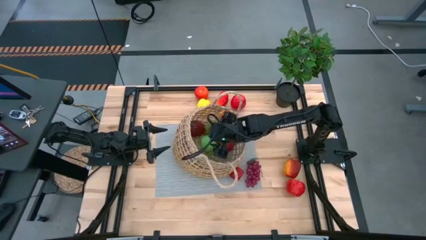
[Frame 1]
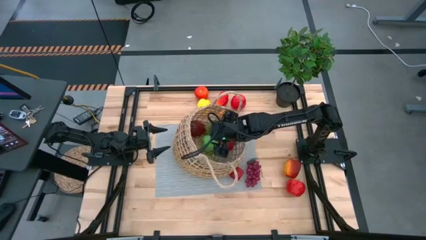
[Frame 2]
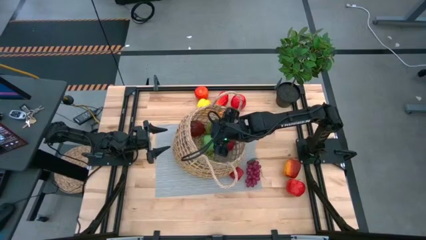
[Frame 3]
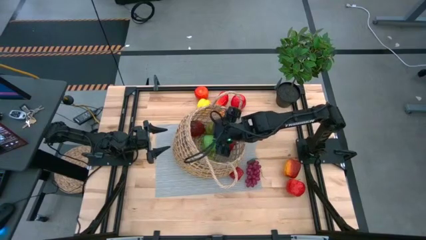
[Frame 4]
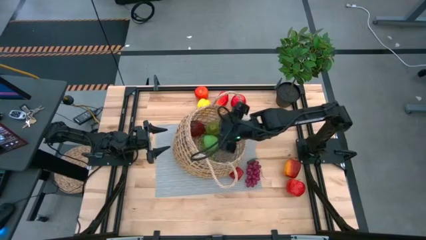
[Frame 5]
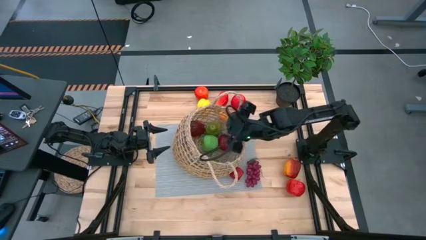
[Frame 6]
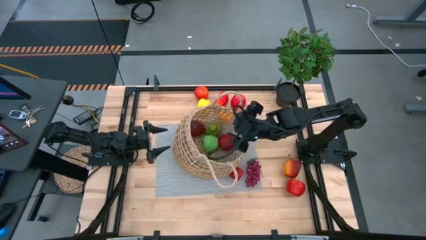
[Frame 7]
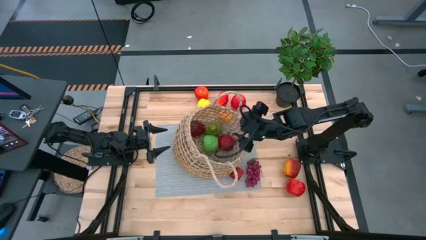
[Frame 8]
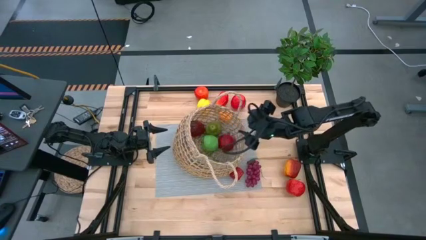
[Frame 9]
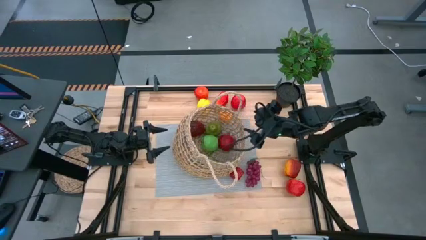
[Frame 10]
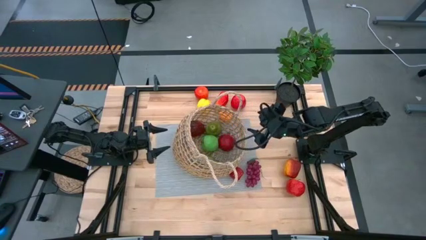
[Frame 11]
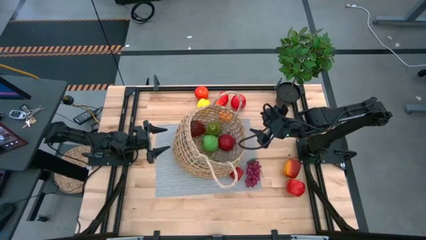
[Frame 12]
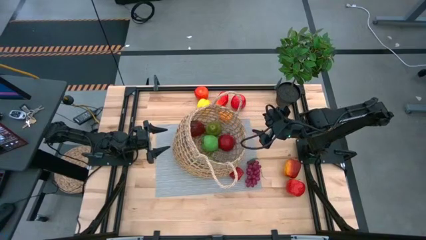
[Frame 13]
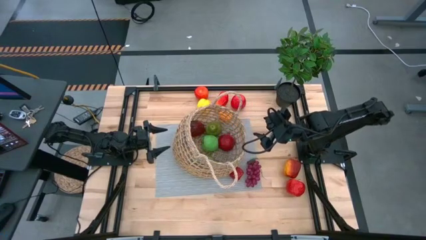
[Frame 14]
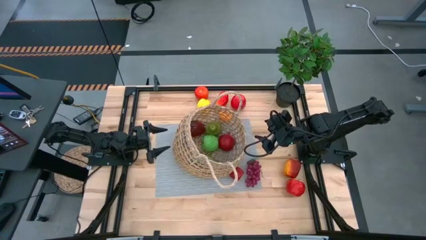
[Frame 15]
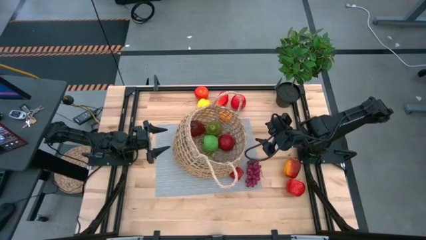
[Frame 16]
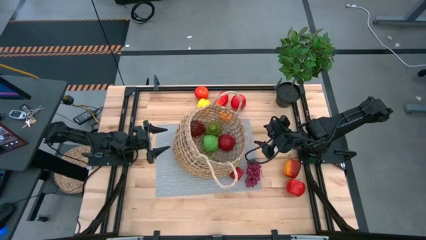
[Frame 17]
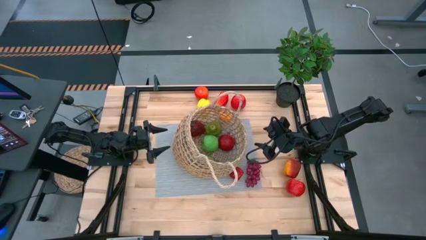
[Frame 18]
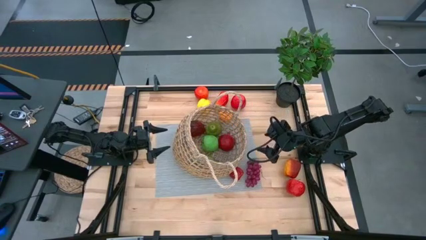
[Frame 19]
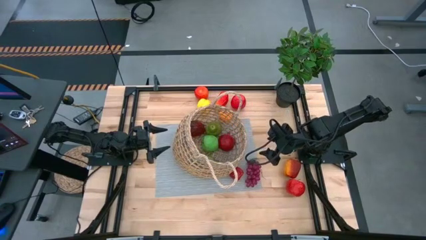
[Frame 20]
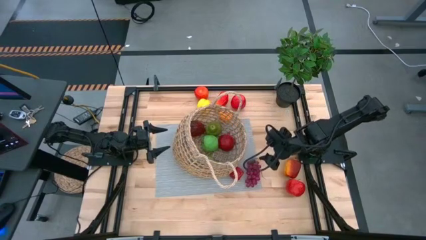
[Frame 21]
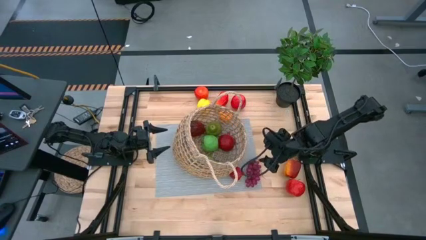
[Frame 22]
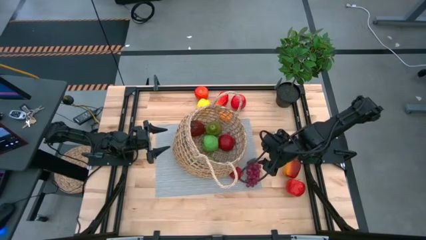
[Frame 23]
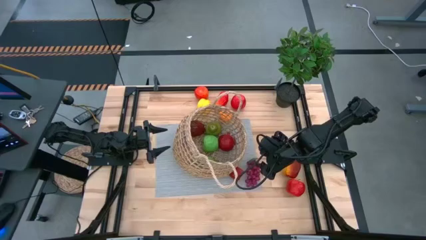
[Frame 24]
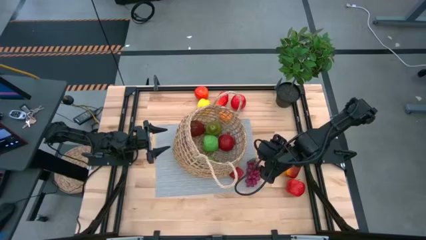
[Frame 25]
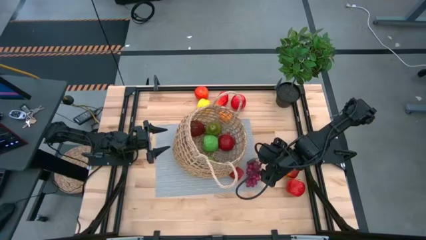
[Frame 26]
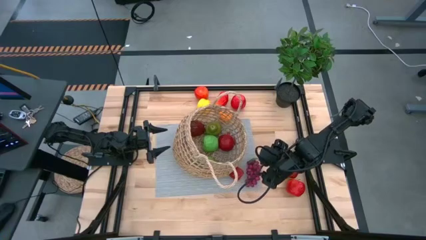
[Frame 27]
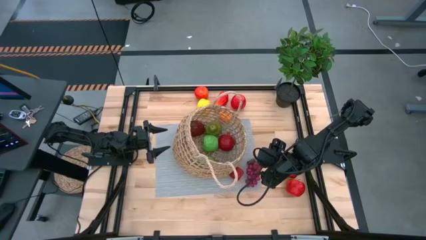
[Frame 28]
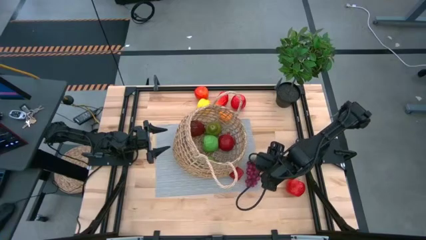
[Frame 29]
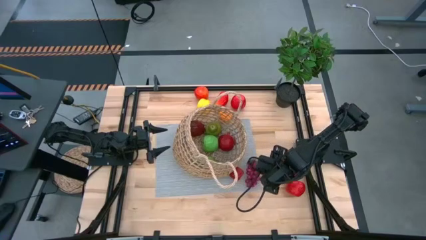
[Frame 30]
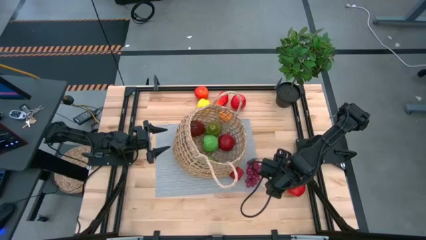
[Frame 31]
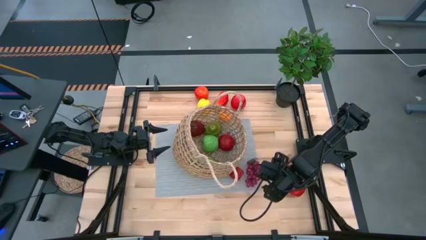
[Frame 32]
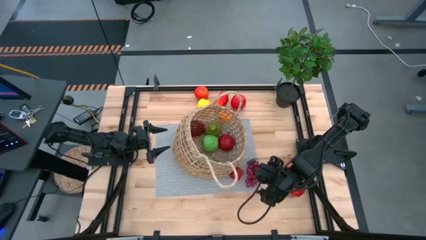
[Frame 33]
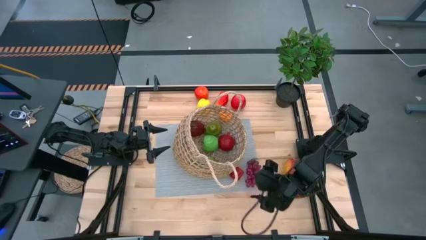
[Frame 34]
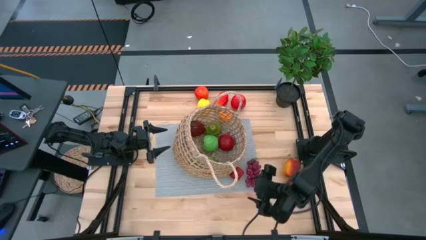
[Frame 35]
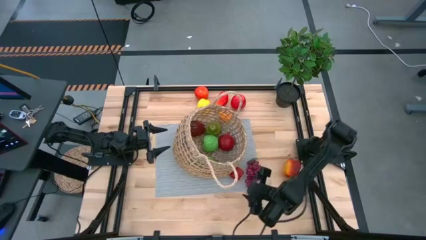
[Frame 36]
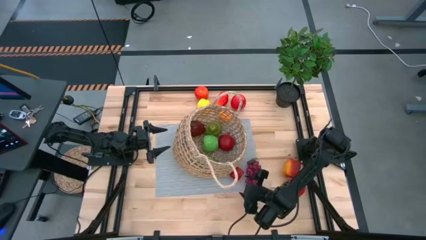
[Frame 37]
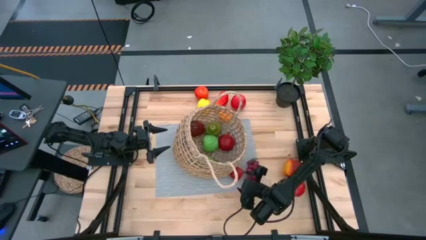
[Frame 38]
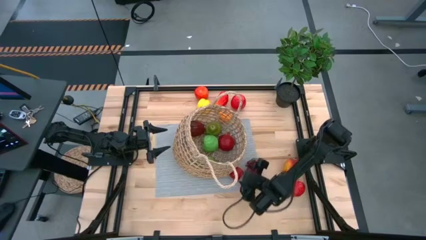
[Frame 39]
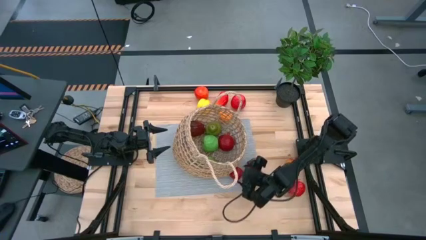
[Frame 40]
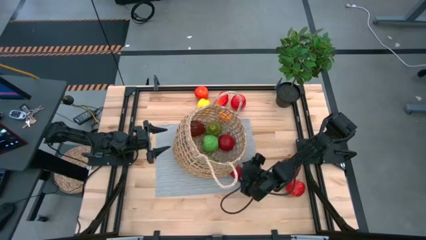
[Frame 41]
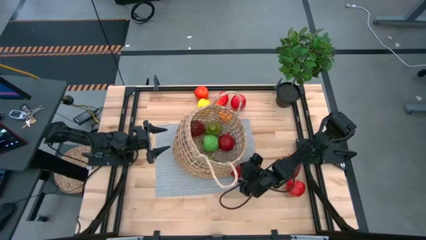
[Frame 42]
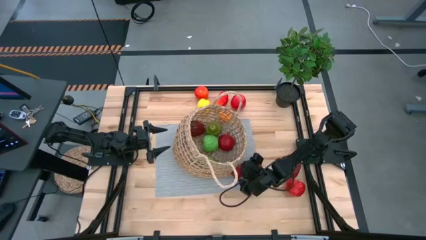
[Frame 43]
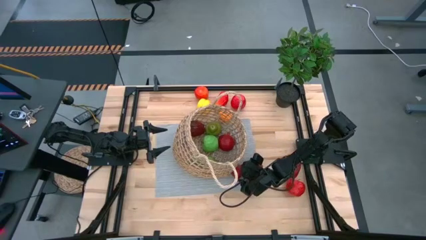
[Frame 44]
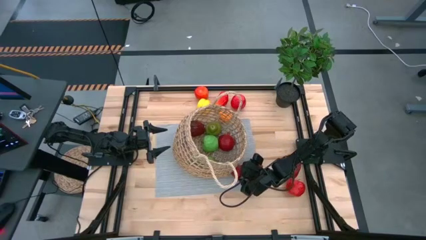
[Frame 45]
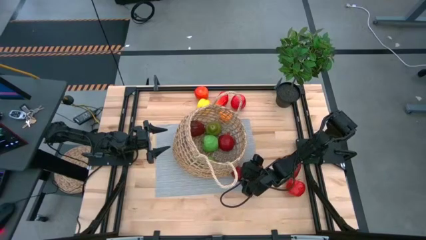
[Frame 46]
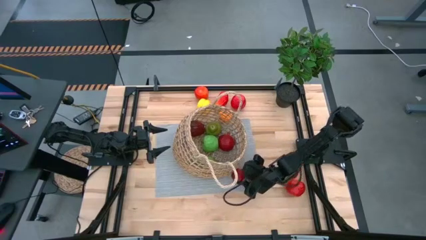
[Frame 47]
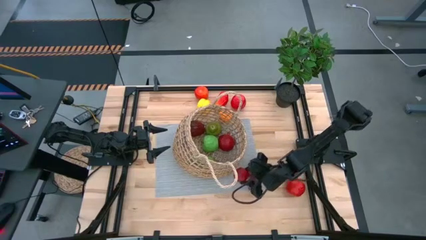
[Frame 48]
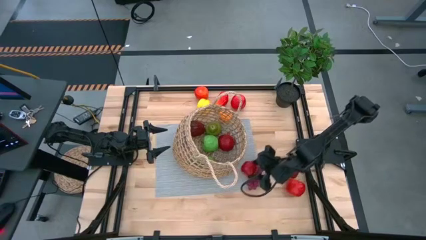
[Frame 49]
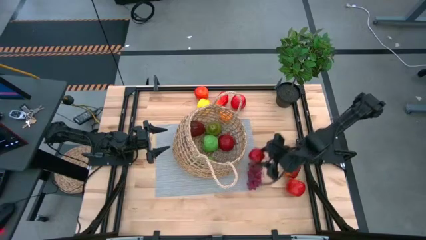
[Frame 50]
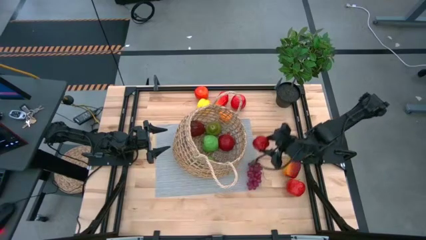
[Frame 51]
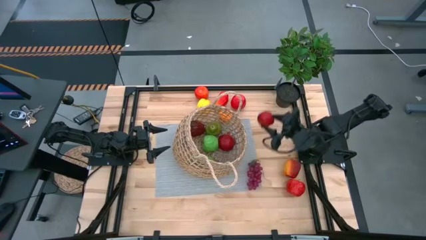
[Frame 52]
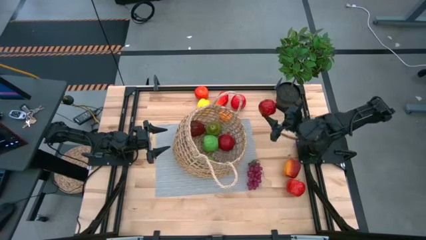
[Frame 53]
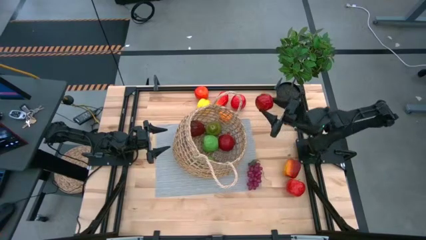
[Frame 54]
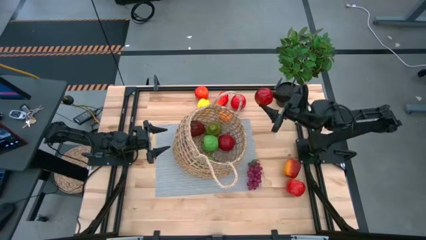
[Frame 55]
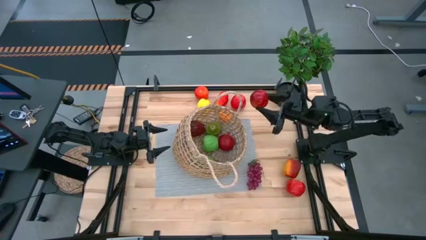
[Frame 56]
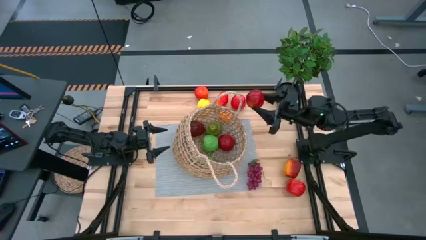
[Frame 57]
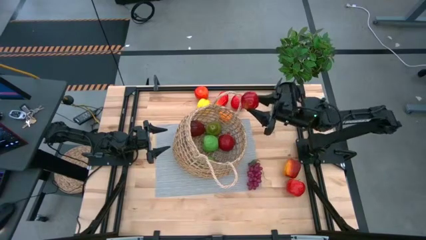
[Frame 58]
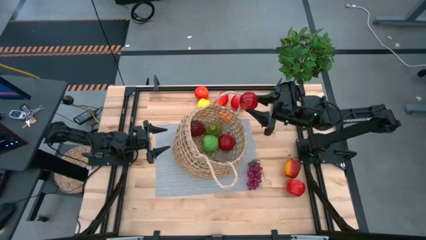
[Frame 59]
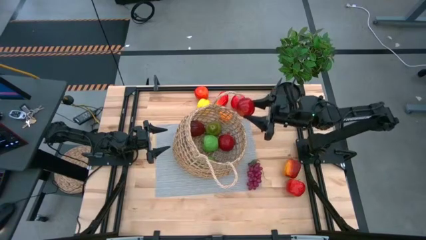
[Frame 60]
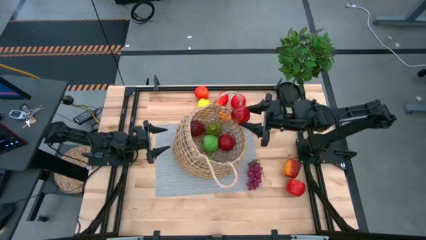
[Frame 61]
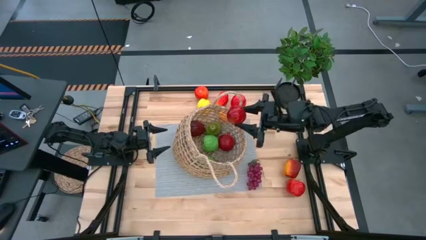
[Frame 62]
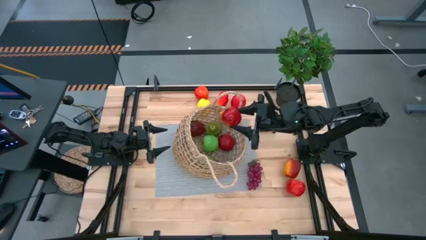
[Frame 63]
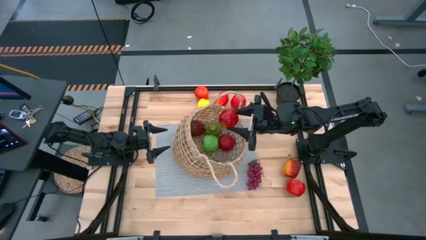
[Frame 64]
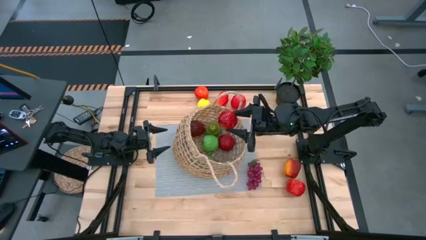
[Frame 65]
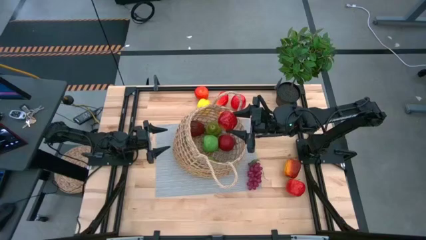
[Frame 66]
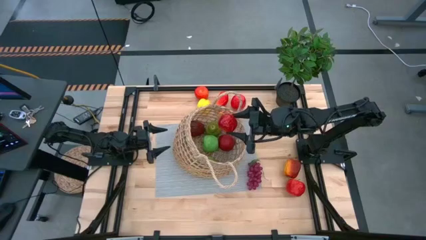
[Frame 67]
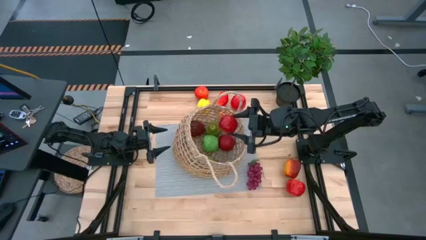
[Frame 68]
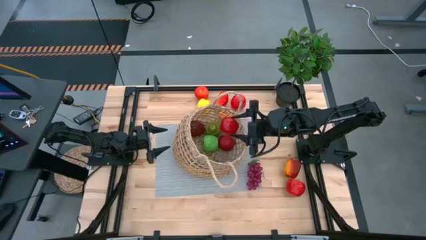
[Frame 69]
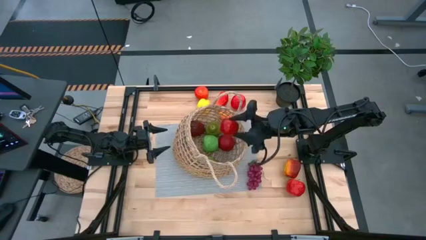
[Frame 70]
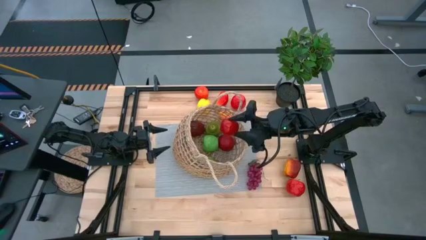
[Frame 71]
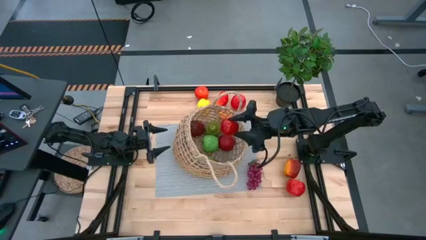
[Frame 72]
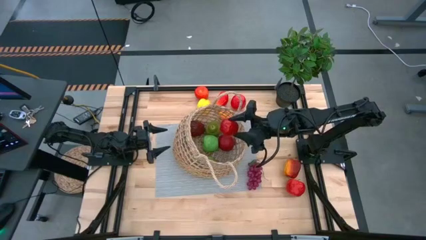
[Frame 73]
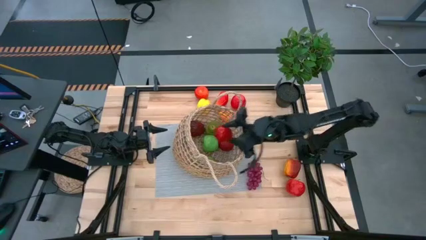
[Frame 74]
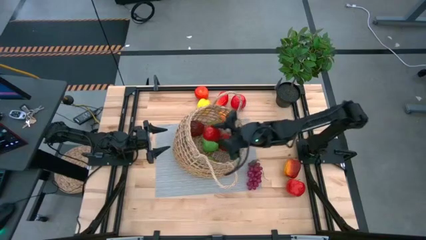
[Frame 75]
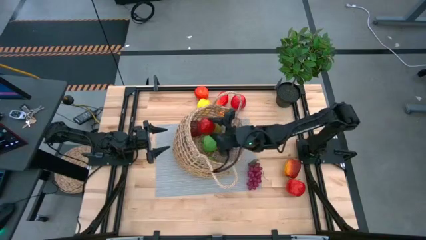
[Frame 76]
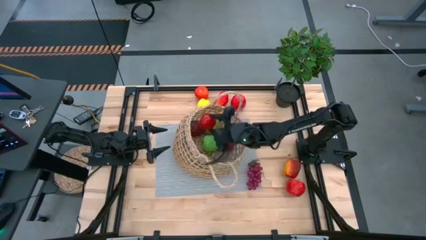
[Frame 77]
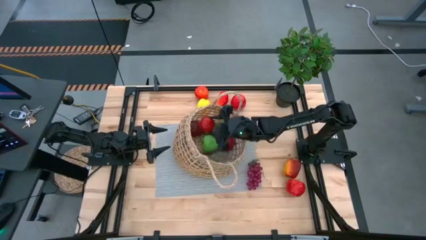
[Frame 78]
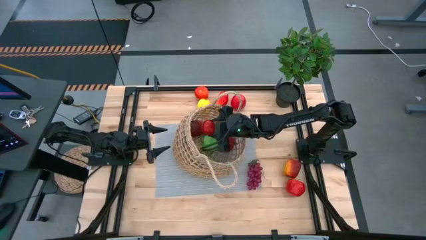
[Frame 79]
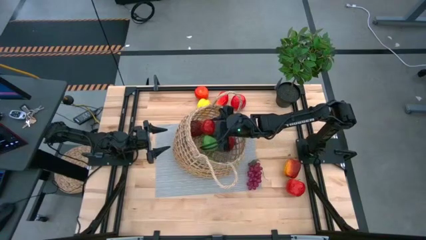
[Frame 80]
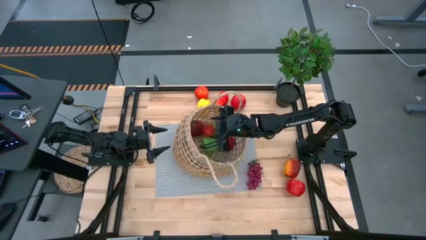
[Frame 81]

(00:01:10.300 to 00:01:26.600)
Task: Build produce basket
Put the bottom left red apple into the mesh basket

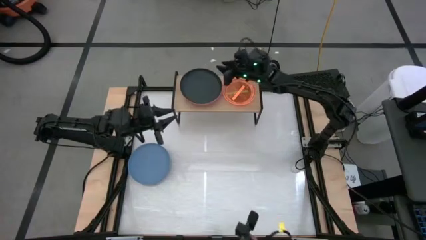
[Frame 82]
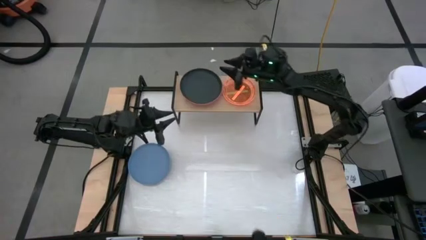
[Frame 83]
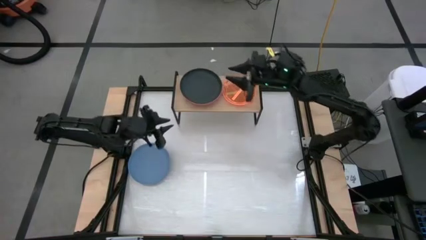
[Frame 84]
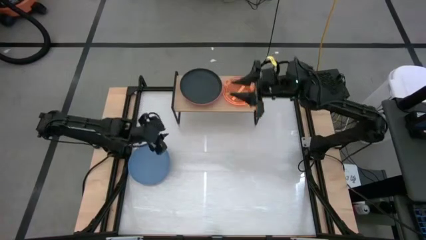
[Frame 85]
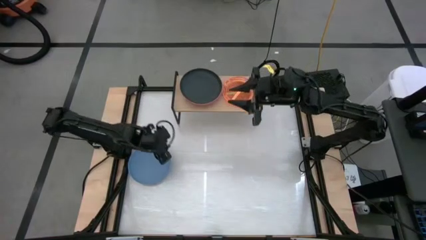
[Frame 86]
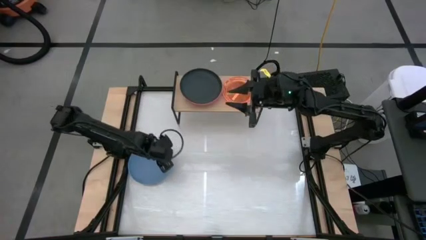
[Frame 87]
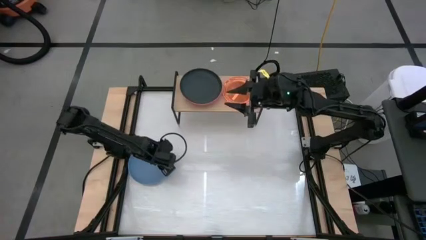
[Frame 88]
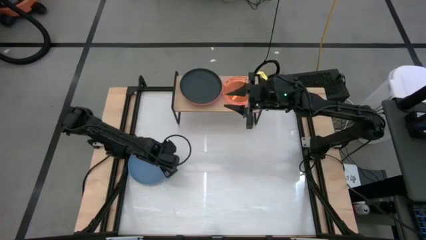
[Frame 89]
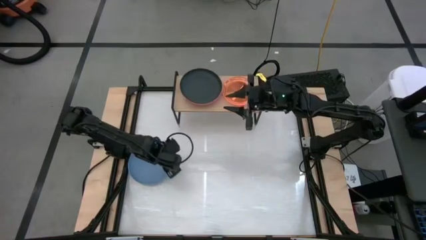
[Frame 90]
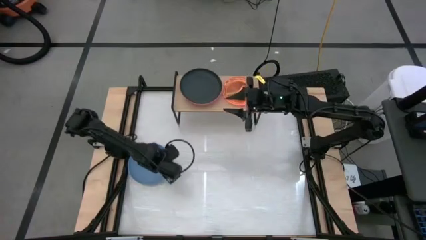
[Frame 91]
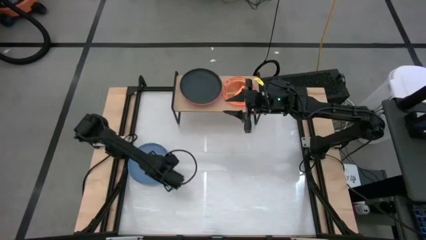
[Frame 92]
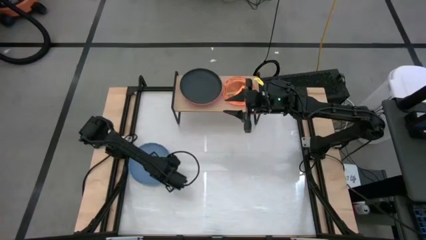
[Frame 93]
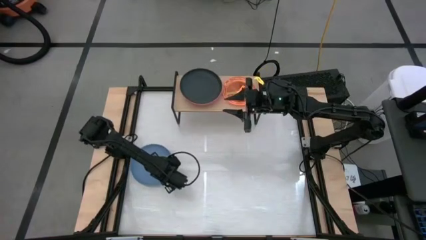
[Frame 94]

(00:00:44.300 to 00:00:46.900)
Task: Place and stack plates onto a shelf
Stack the blue plate on top of the black plate on the shelf
